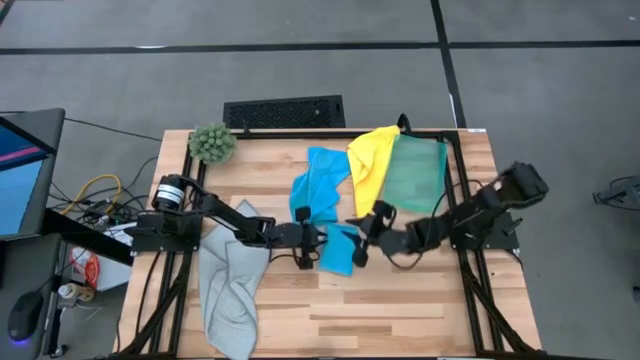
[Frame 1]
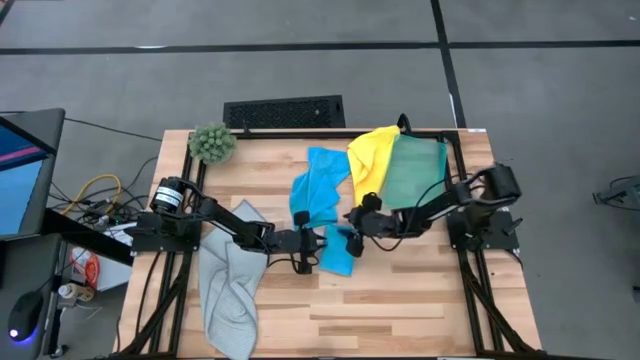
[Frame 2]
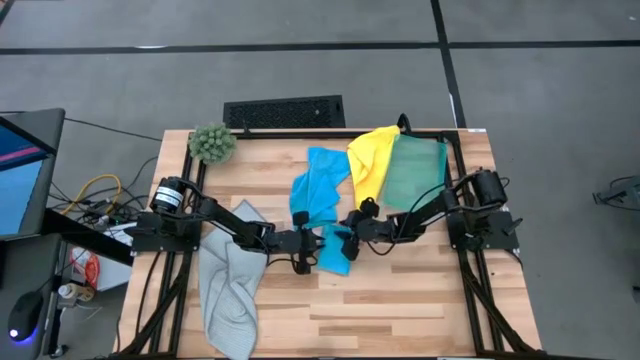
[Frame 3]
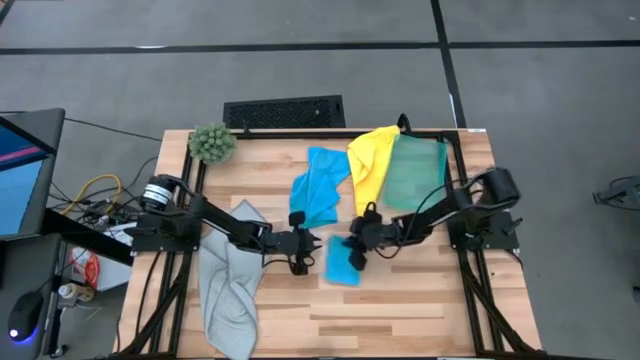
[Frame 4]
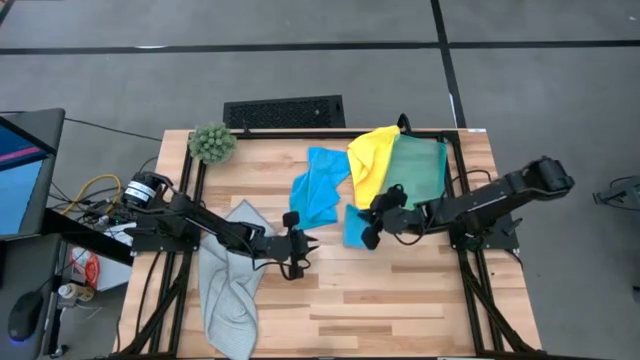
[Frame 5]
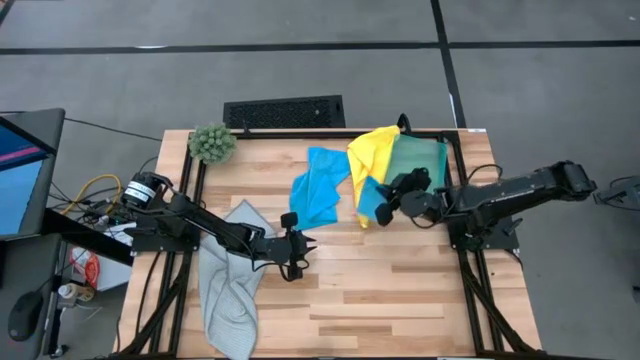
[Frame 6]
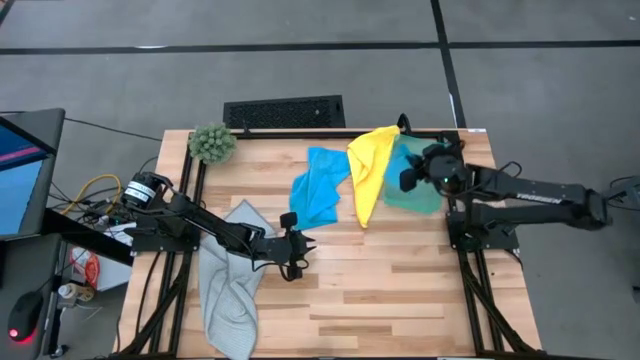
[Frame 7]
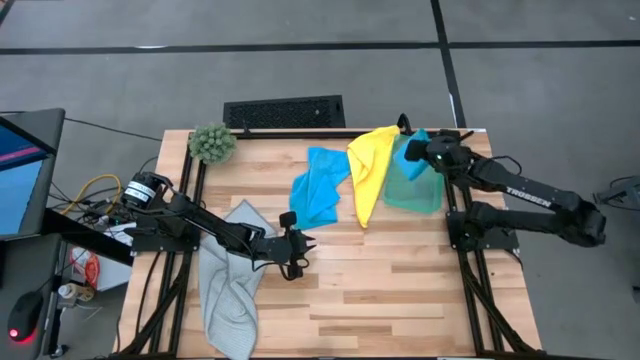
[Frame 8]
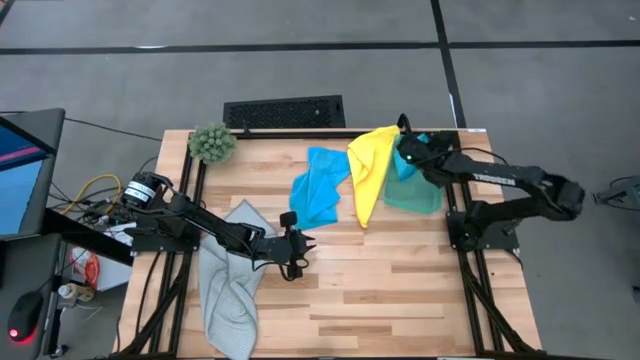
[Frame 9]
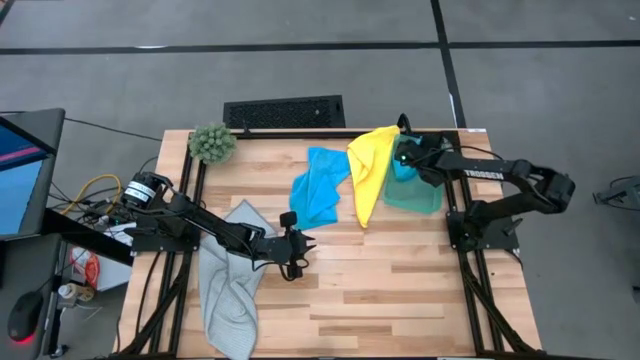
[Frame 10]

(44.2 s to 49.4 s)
Task: Fold microfiber towels
Put the folded microfiber cloth in the bin

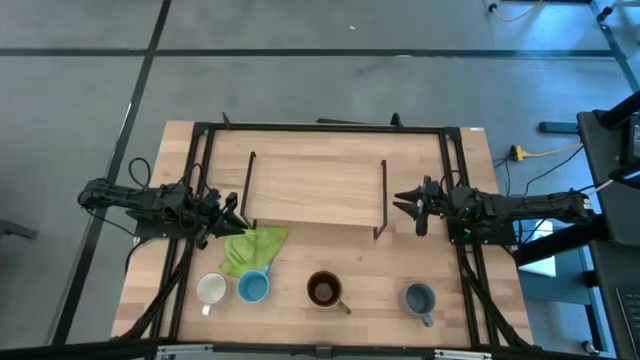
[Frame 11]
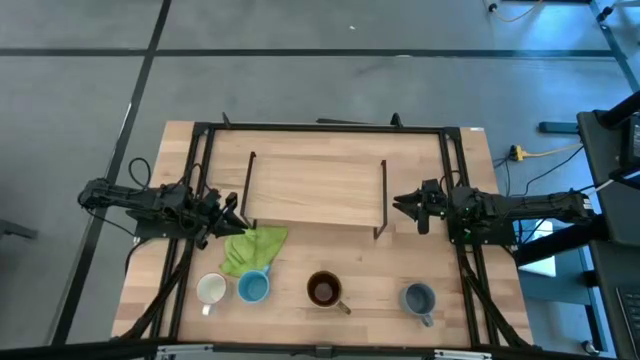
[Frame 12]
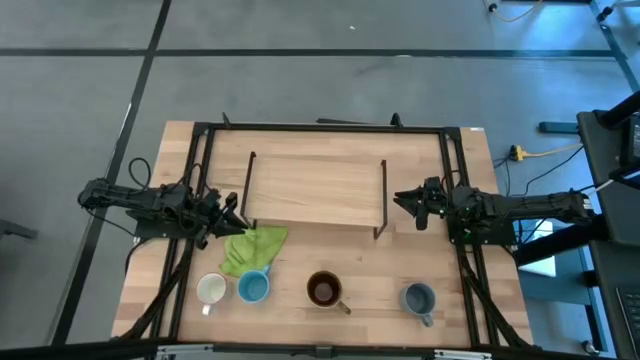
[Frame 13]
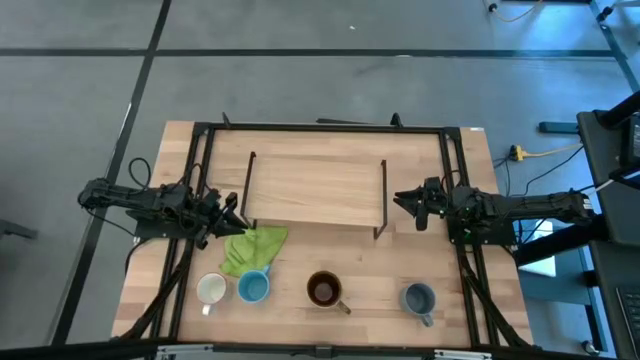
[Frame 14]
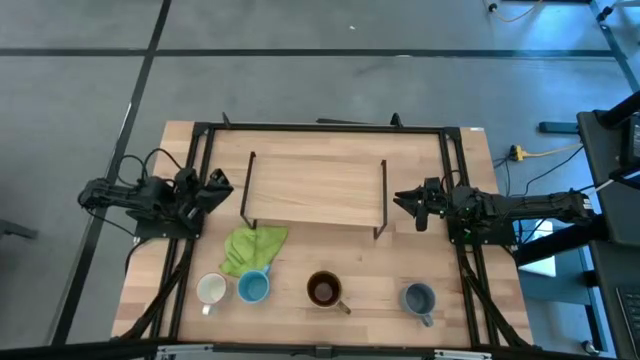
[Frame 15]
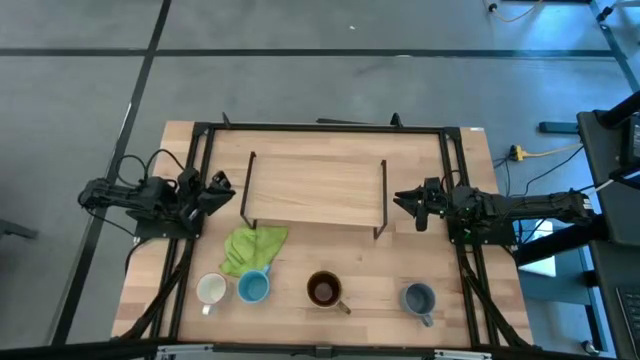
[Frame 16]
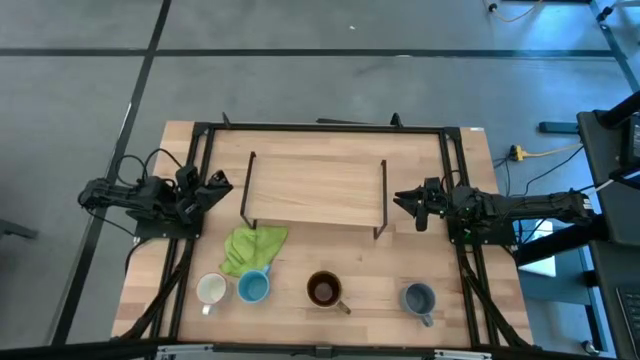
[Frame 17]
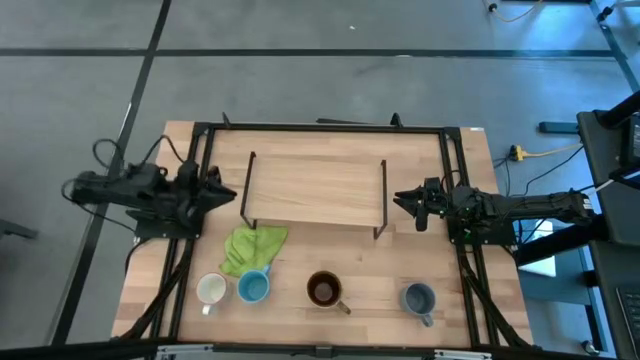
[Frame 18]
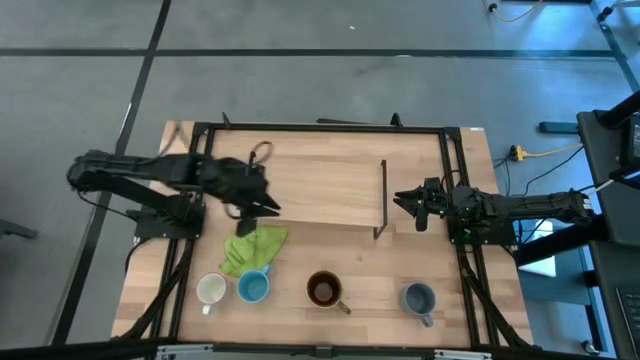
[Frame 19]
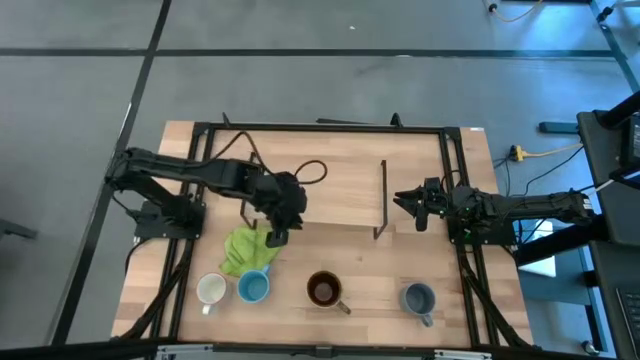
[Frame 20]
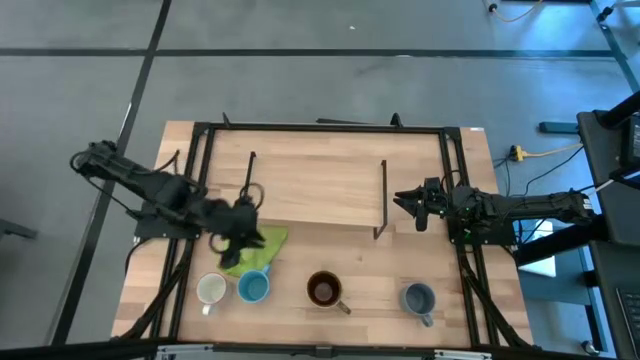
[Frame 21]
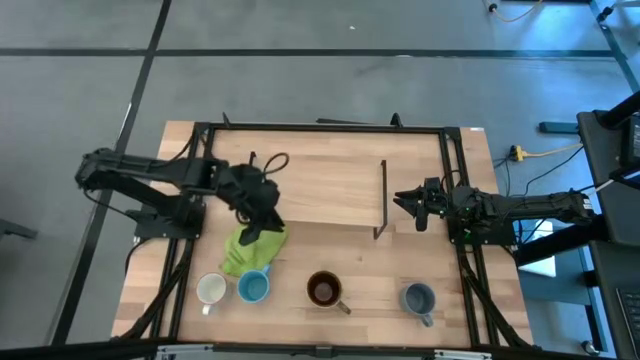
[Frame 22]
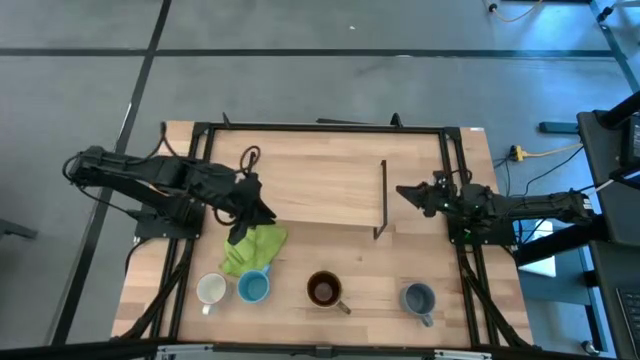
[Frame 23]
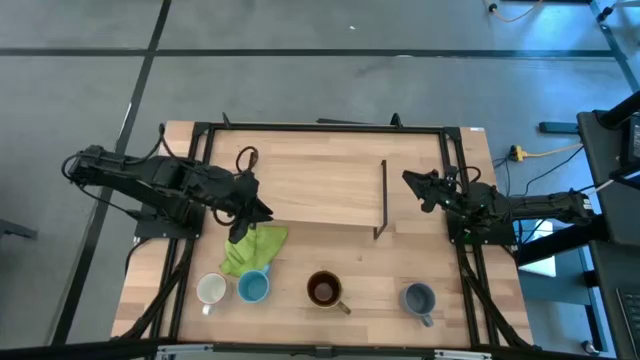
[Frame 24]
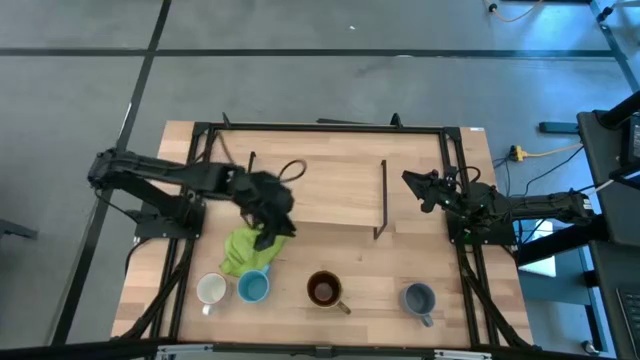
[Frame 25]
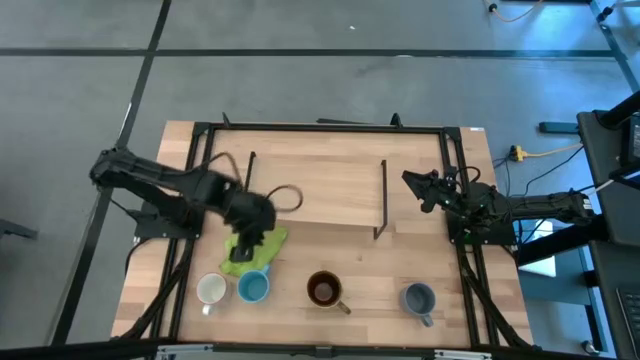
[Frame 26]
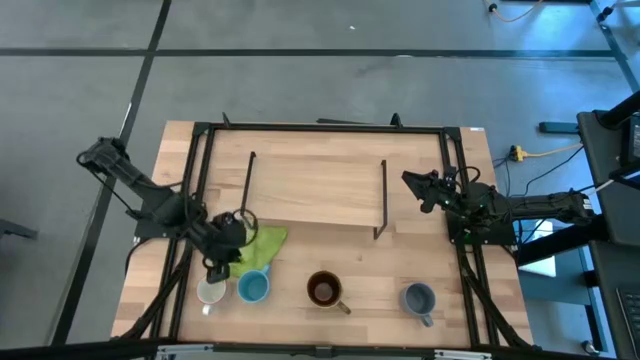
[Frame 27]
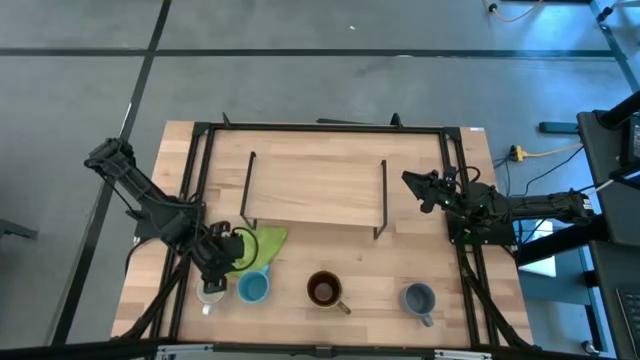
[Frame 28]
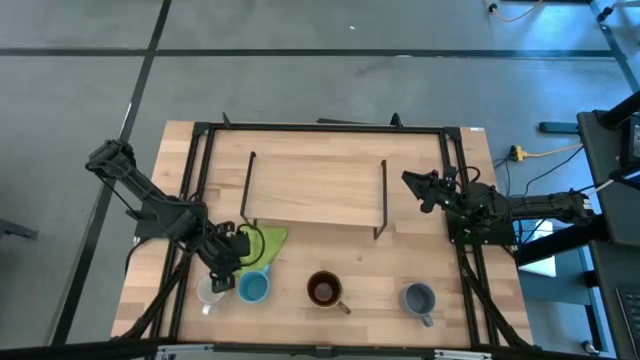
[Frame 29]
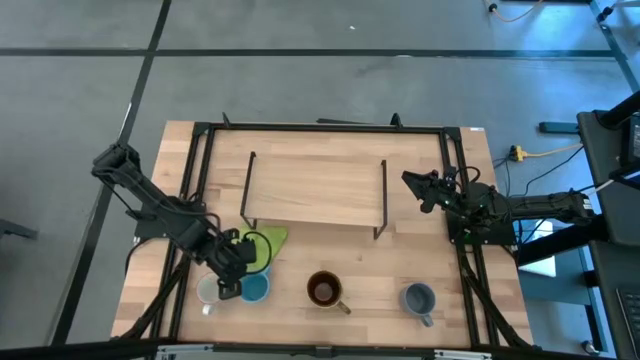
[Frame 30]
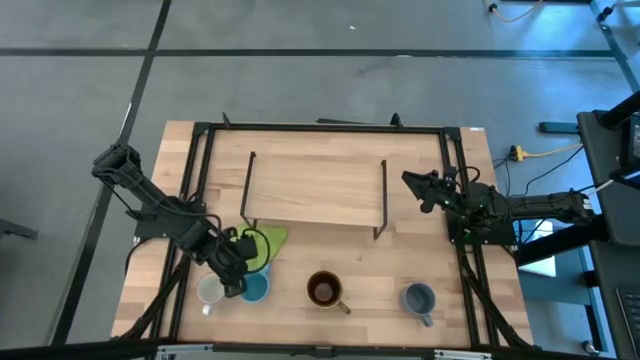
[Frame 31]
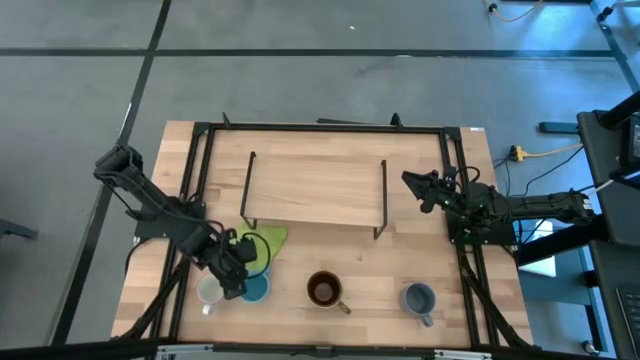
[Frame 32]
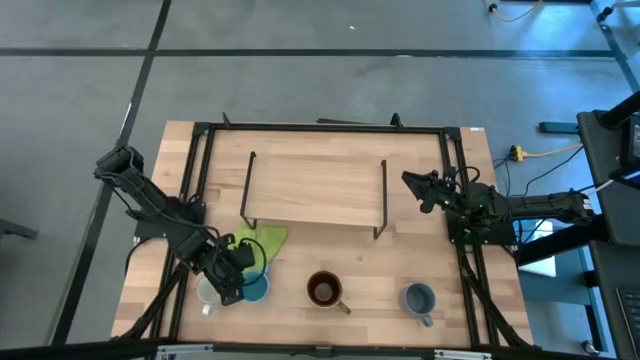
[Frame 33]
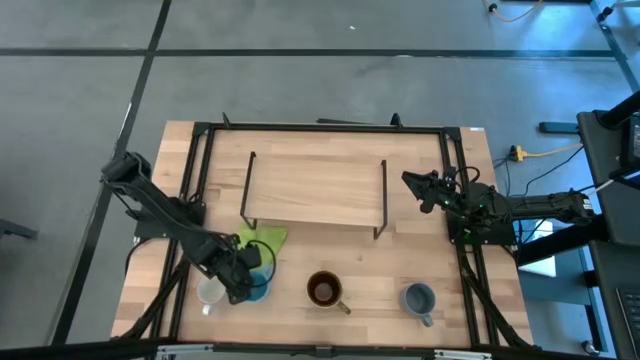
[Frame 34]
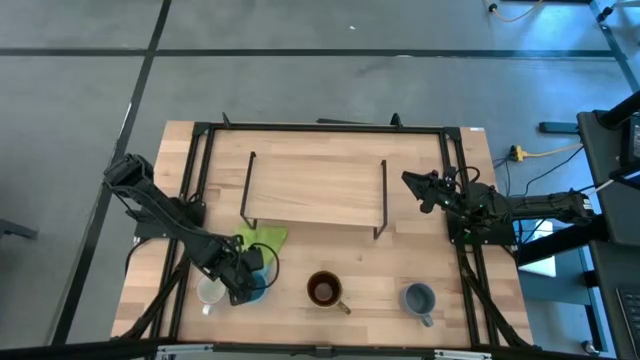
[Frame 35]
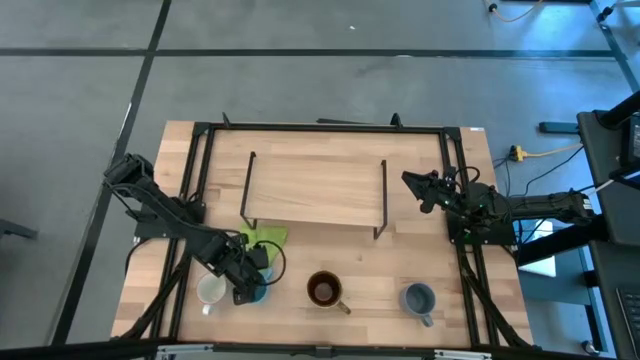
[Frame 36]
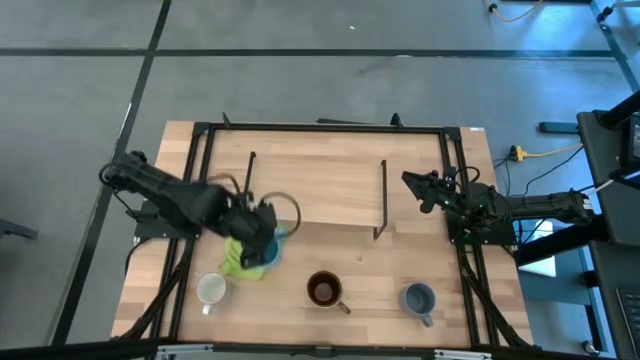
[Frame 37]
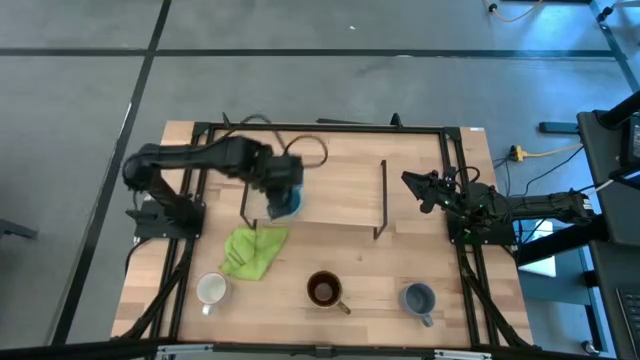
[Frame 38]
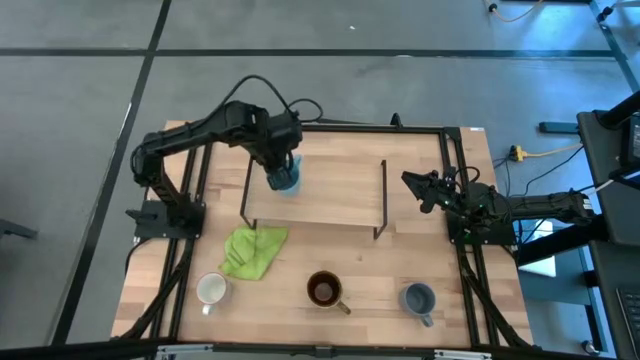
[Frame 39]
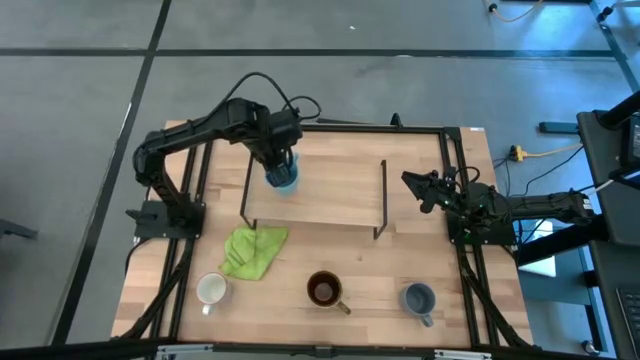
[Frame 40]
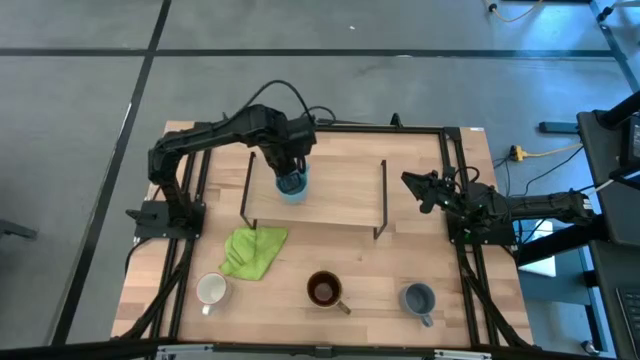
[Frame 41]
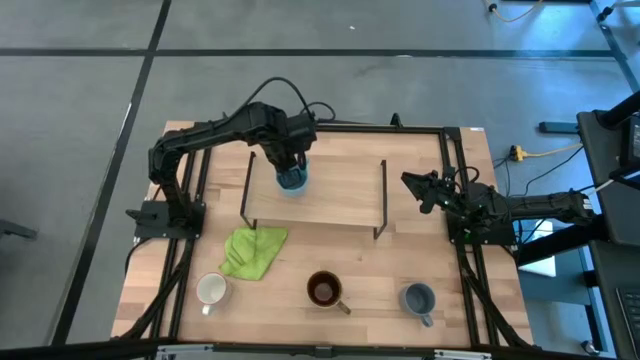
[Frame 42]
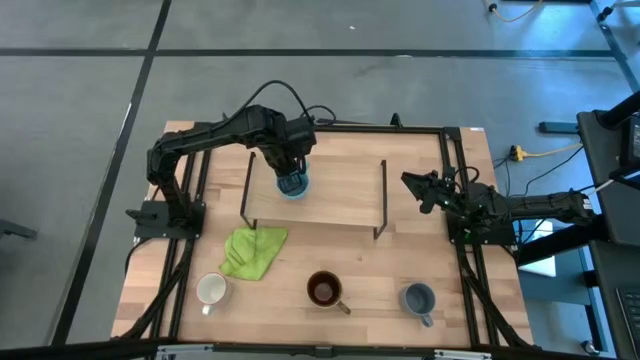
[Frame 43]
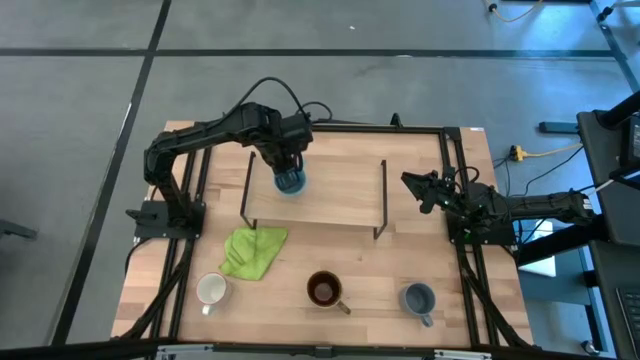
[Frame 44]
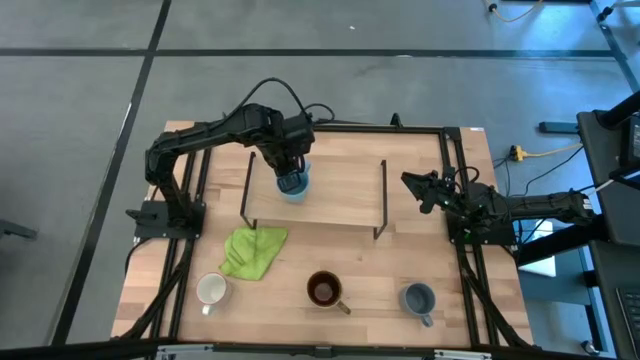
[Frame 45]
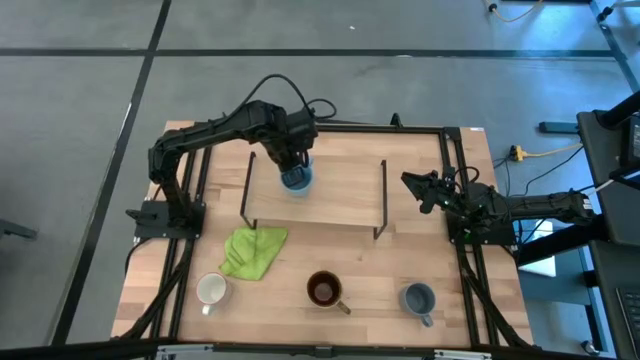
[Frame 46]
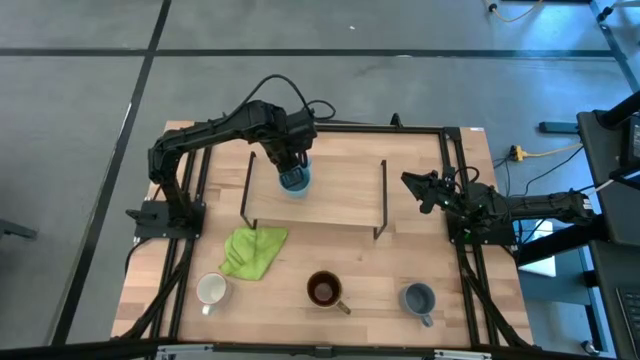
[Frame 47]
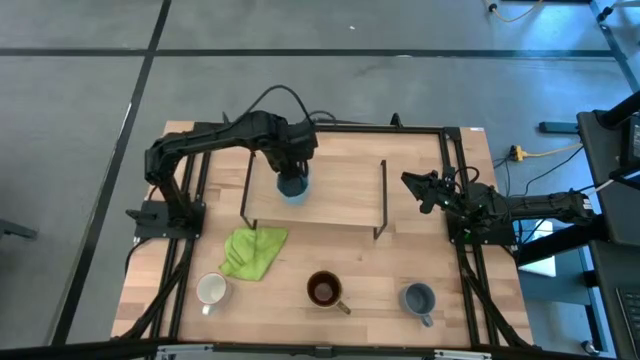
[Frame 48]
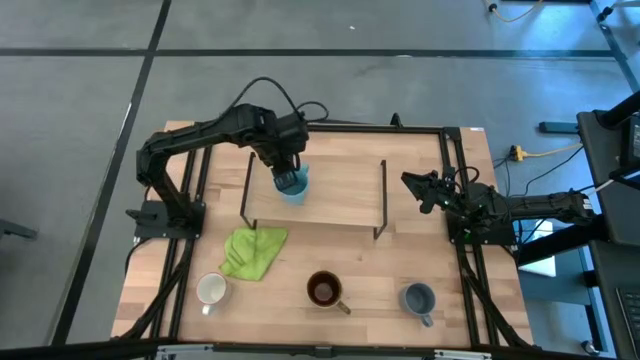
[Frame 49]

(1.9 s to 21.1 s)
Task: Stack small to large cups/mugs on shelf
Put the blue mug on the shelf
